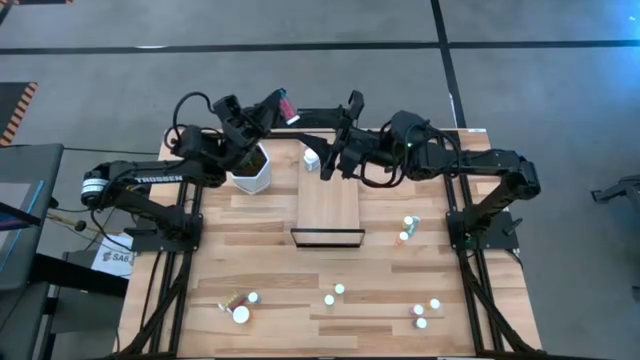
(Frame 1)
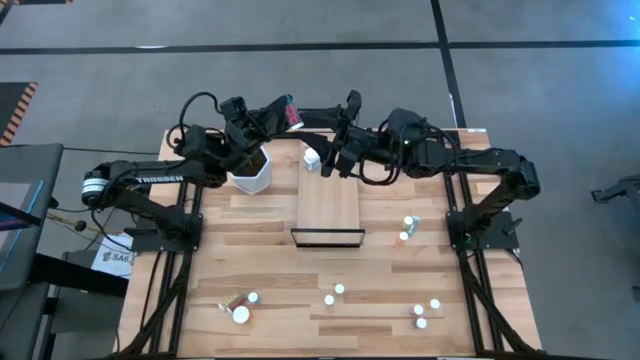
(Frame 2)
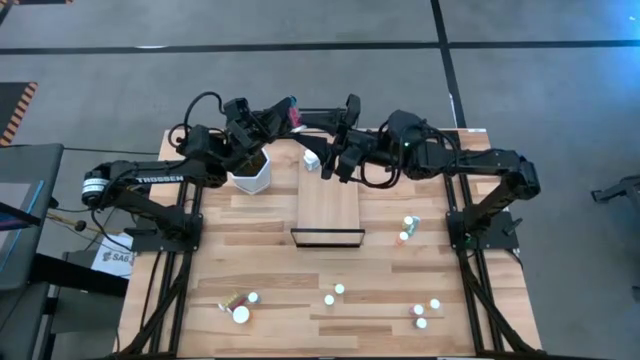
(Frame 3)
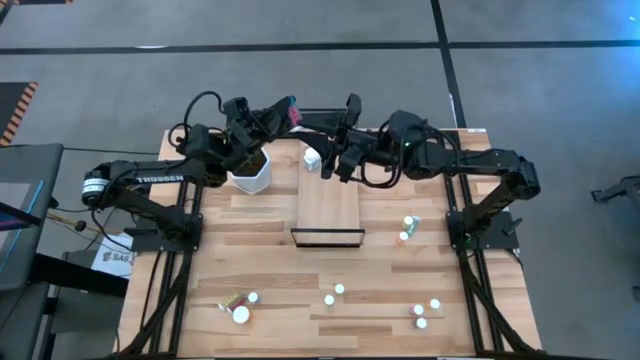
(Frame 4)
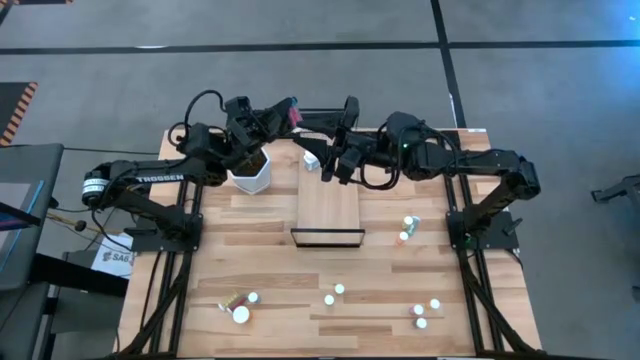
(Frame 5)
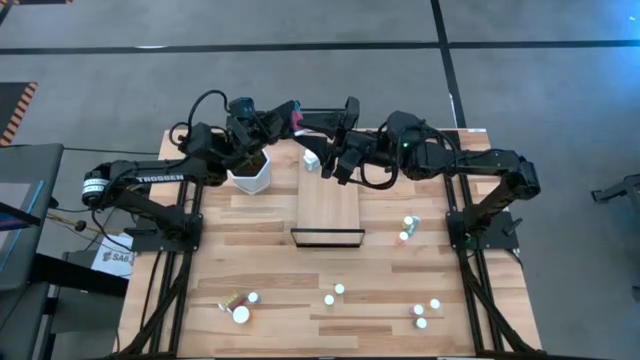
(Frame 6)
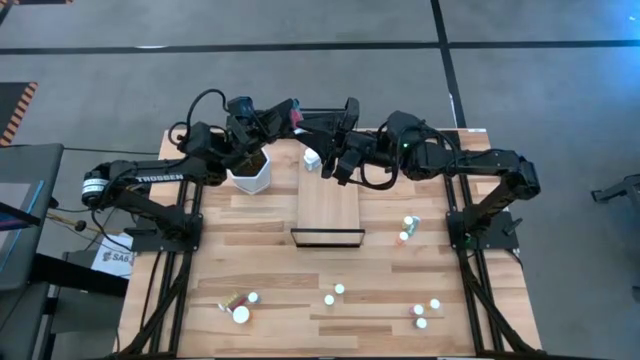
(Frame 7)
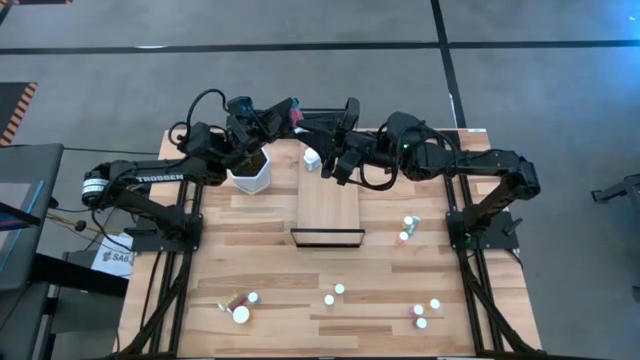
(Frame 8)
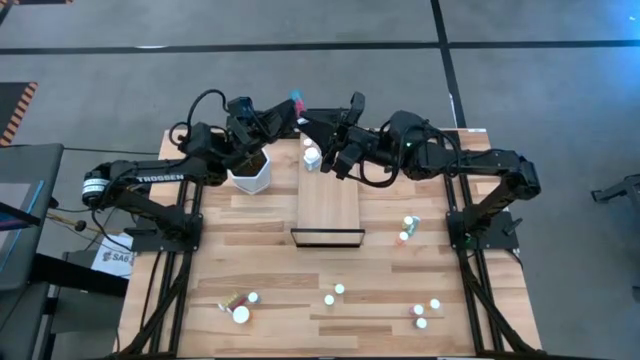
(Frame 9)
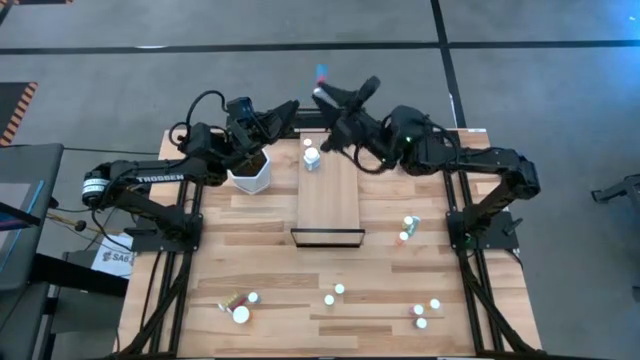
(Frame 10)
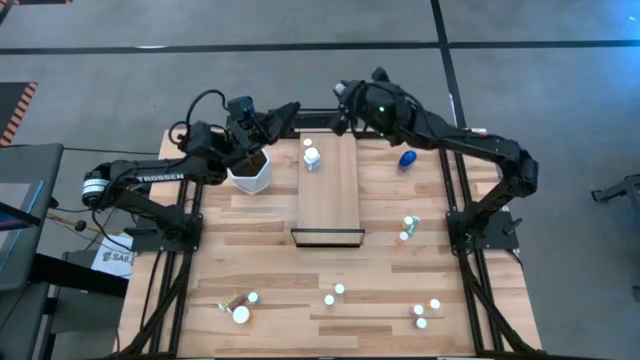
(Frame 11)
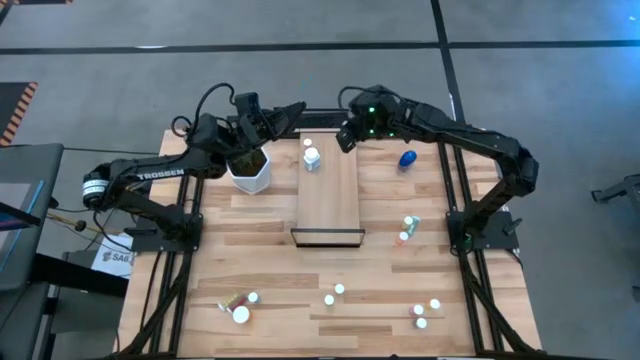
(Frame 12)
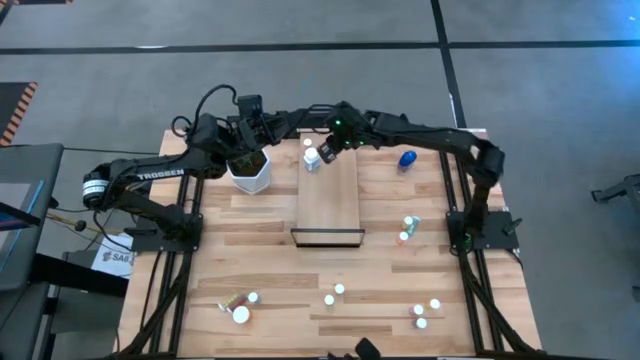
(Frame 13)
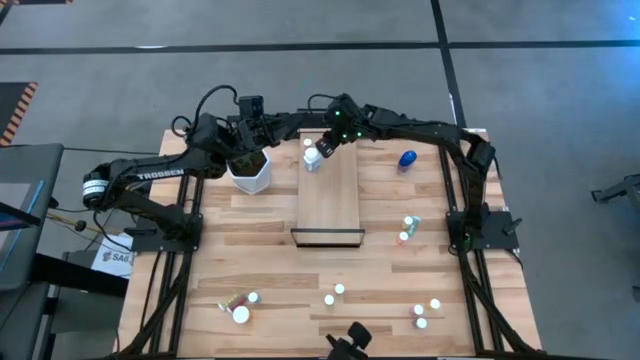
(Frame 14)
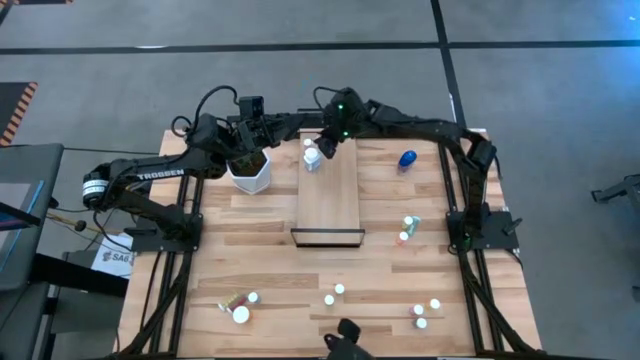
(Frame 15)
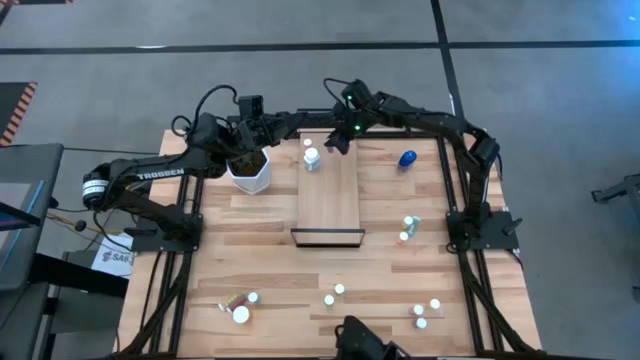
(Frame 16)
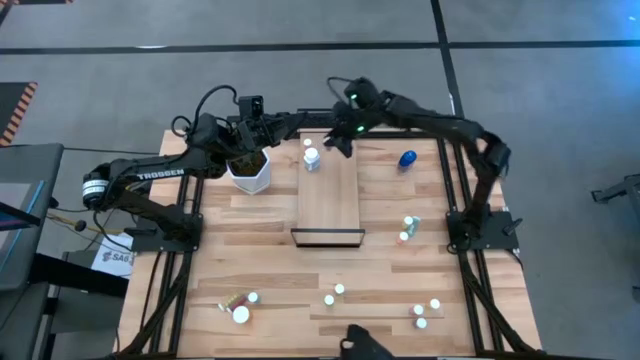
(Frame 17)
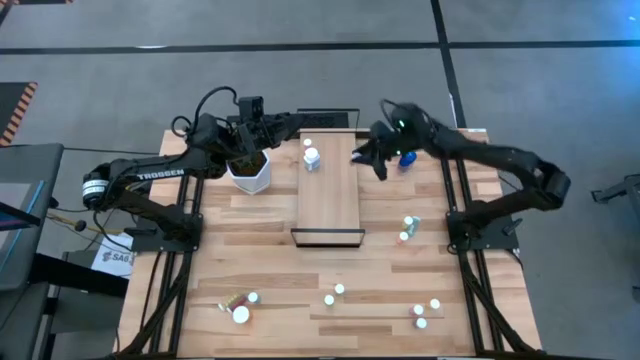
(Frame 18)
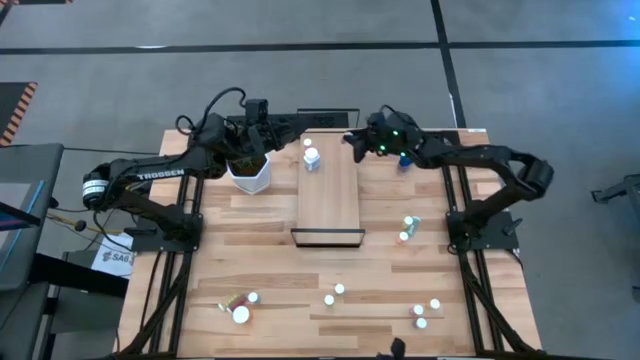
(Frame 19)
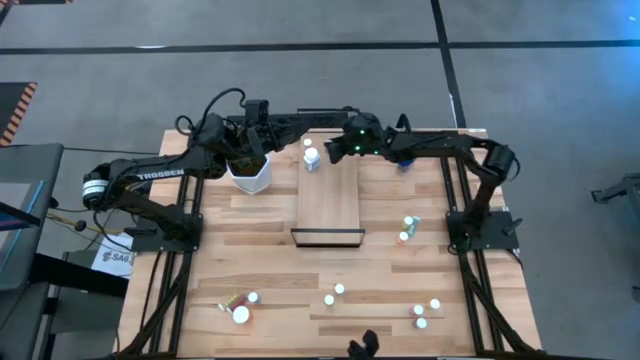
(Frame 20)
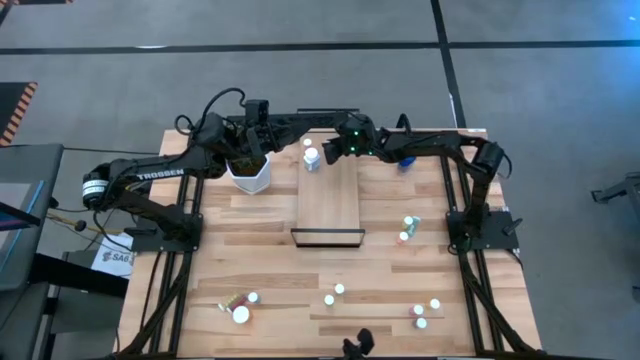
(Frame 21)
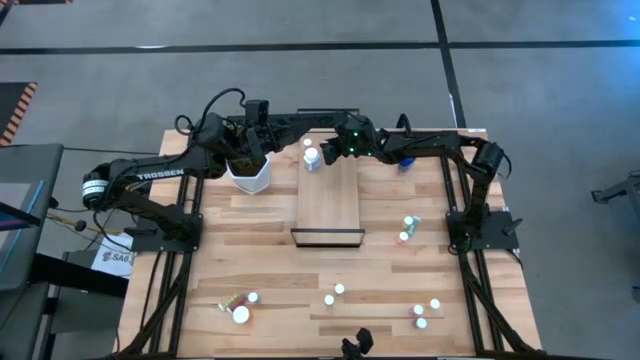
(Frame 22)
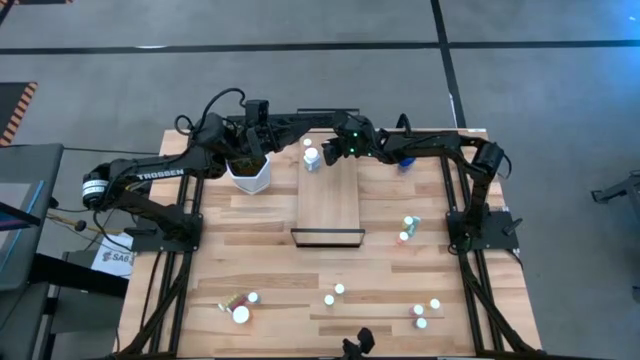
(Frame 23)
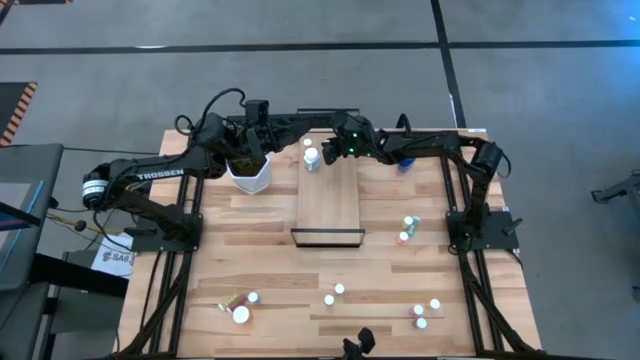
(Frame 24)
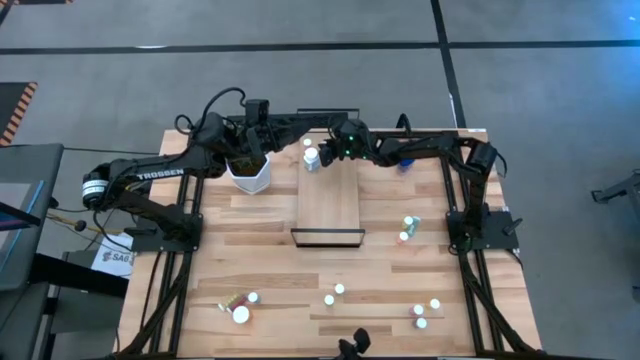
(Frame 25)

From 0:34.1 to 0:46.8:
Task: Pick and place medicine bottles onto shelf by color
Put the blue pill bottle on the shelf

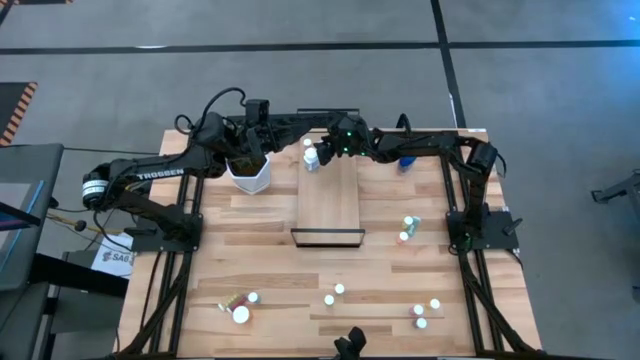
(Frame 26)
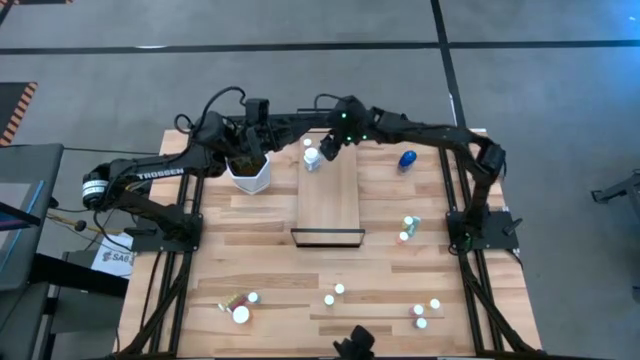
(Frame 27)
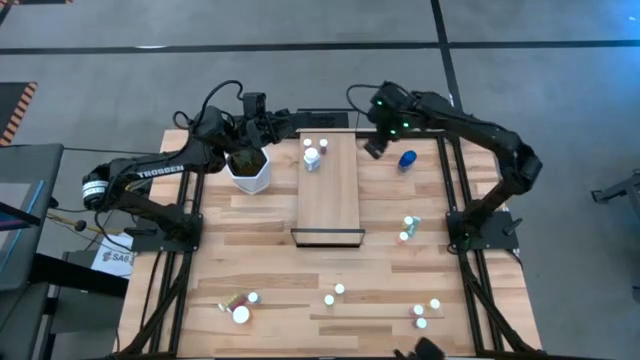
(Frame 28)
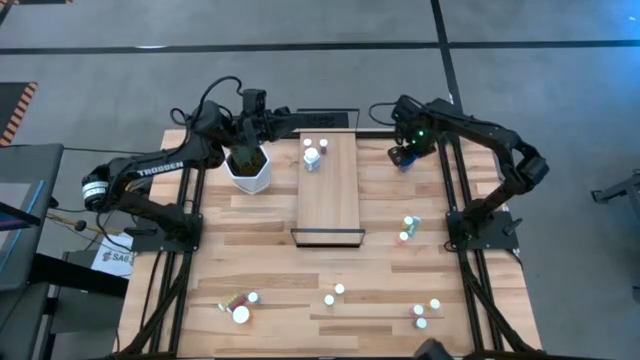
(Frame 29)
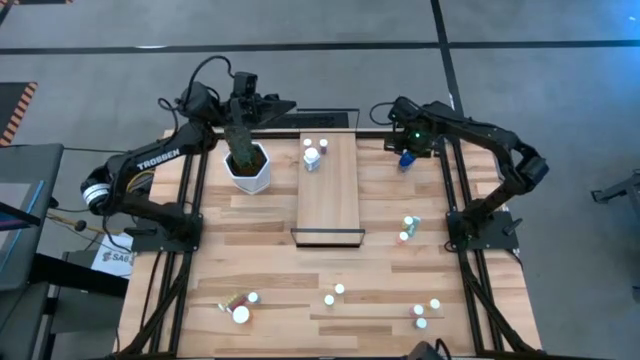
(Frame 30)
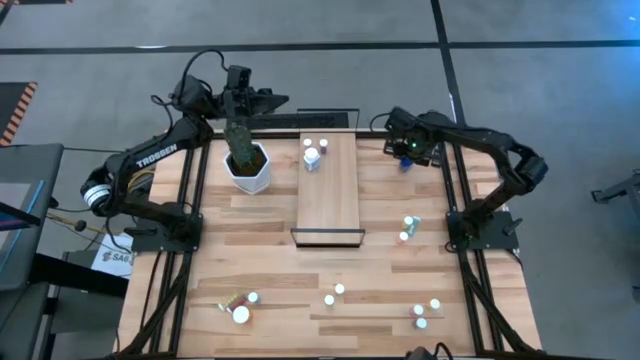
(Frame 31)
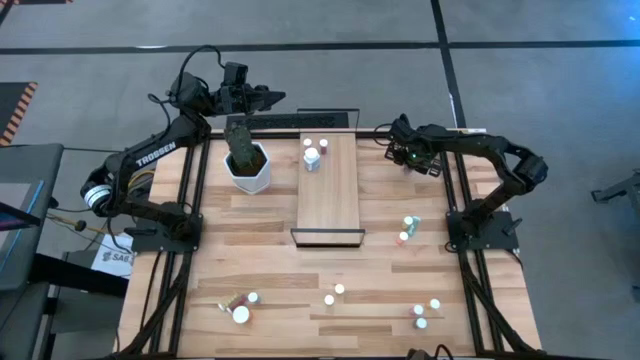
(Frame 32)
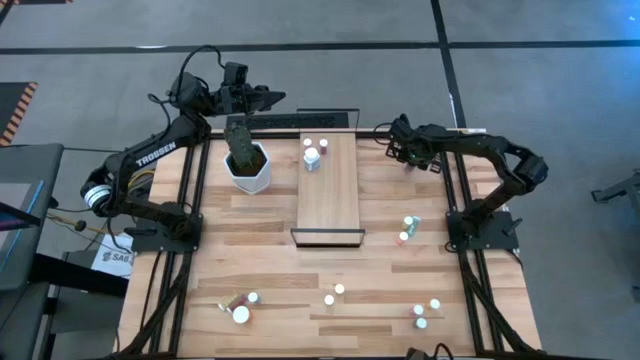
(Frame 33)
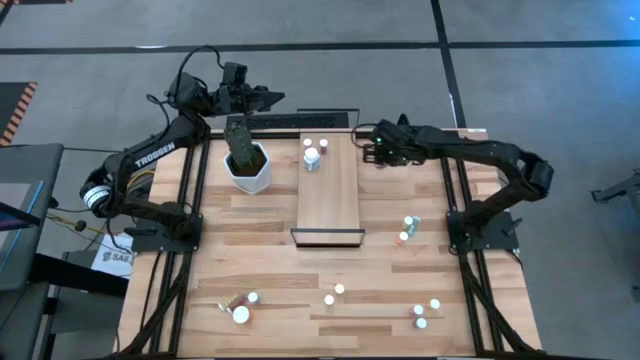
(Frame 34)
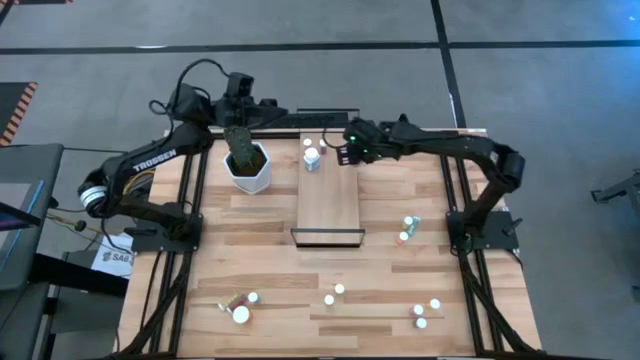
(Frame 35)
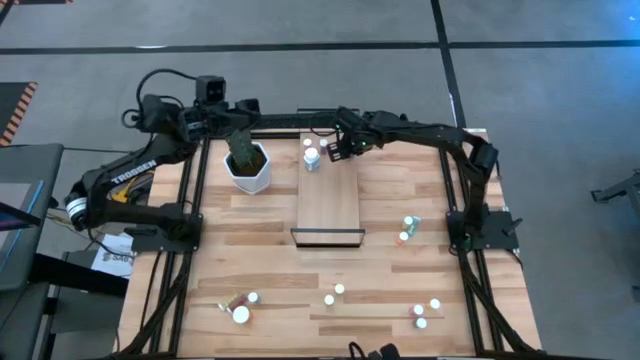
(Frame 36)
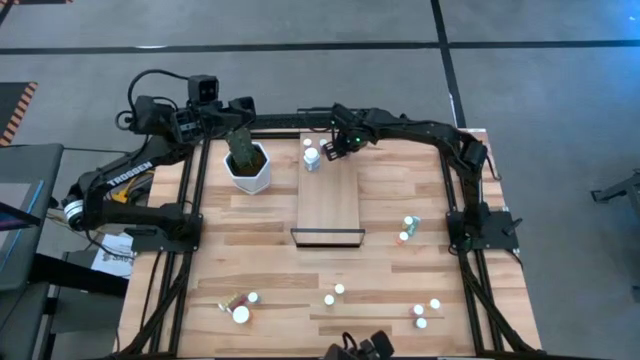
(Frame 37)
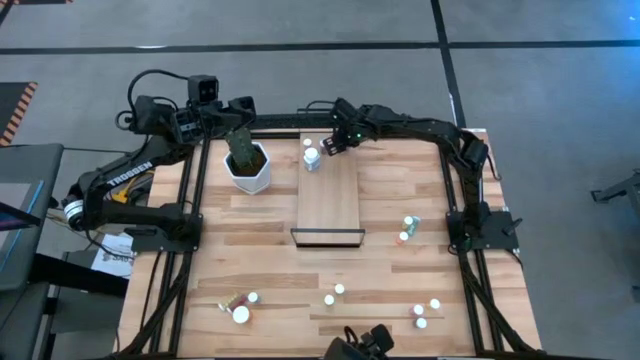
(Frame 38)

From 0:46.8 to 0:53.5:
Put the dark blue pill bottle on the shelf

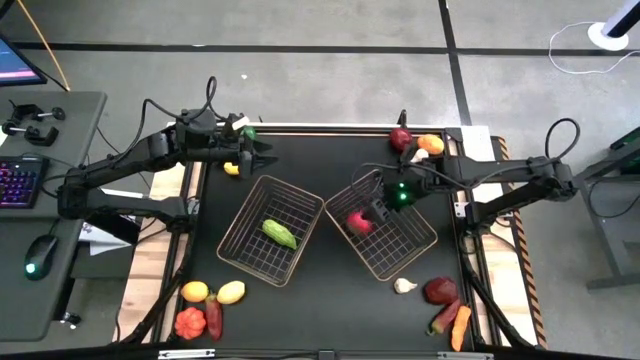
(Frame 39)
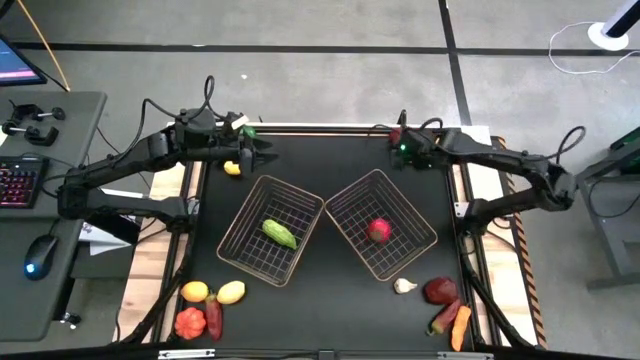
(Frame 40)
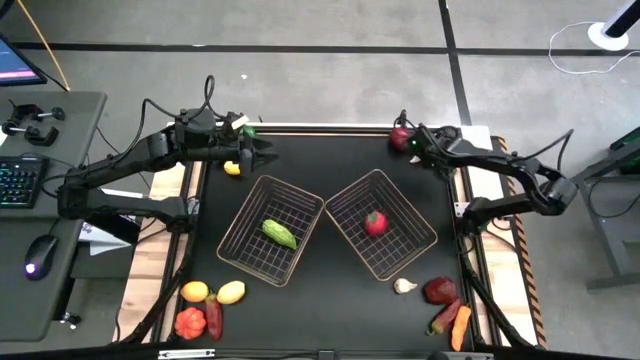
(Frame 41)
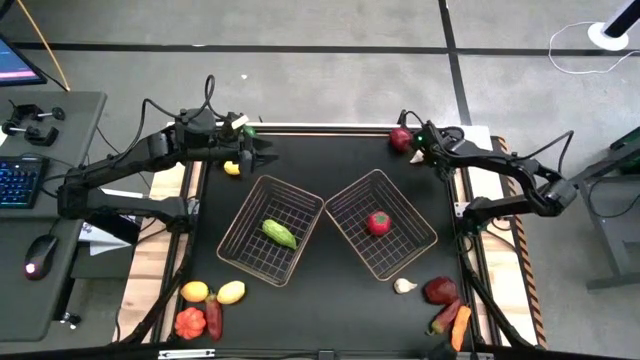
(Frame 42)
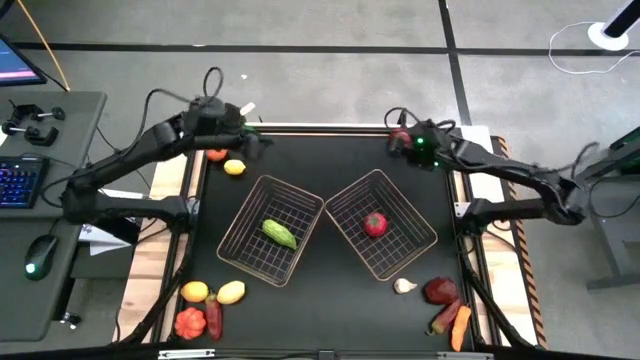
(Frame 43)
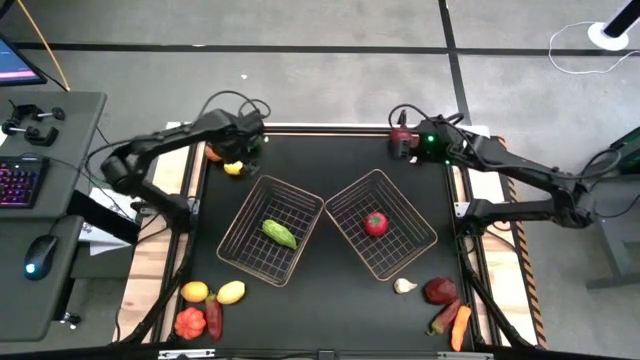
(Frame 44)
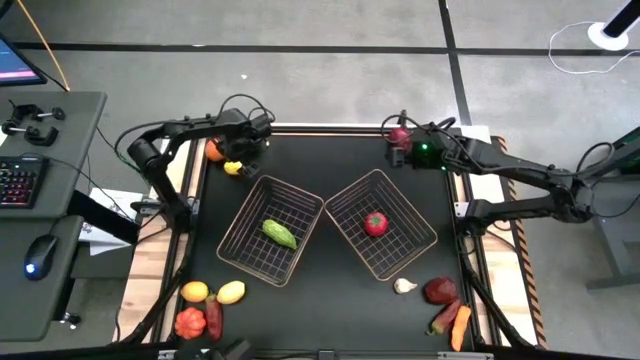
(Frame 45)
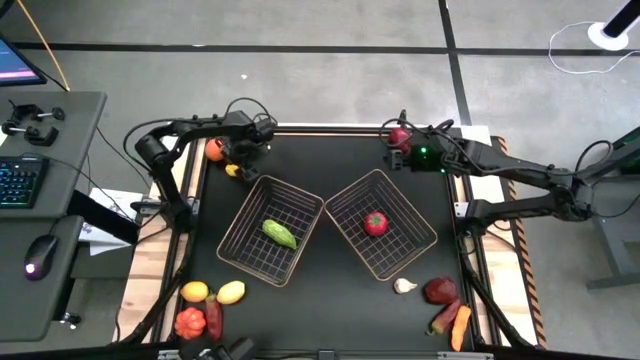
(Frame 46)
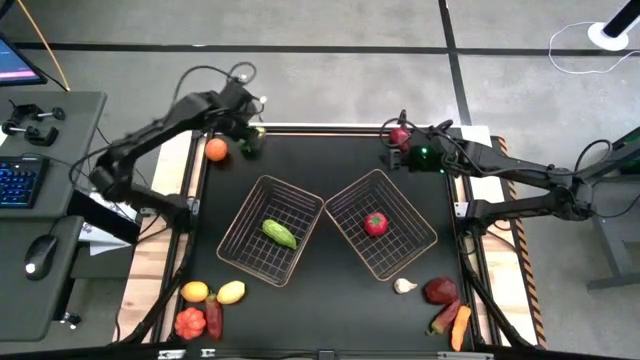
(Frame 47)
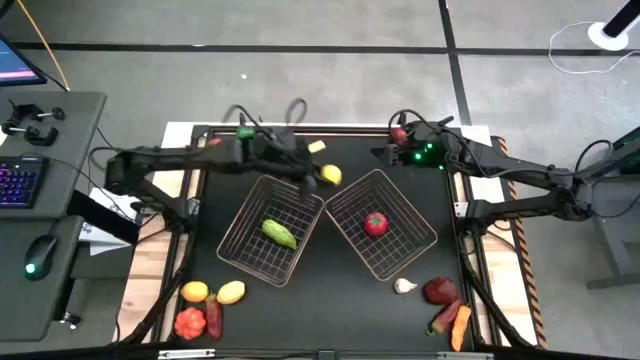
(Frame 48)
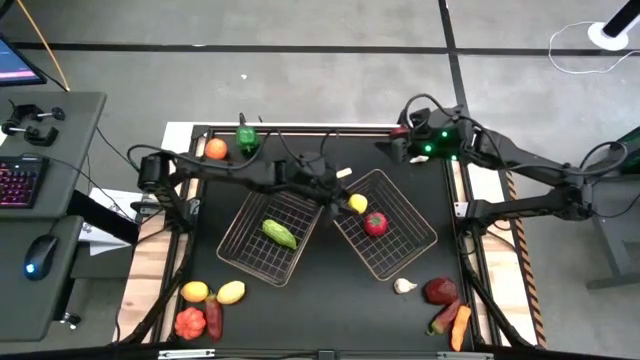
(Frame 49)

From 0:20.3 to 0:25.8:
Task: Sort produce into baskets
Put the top lemon into the right basket
